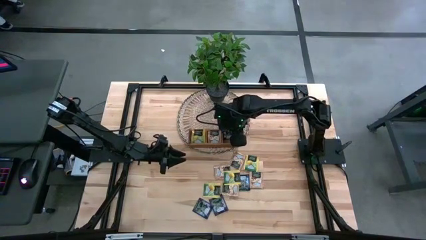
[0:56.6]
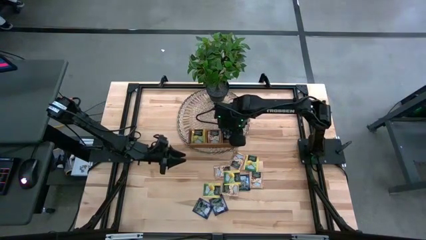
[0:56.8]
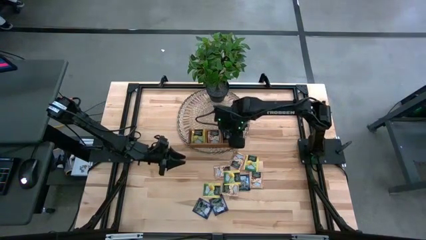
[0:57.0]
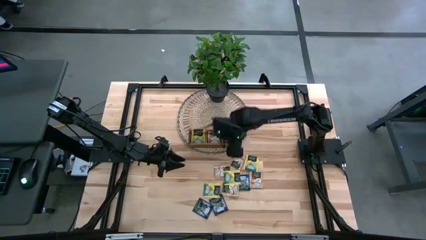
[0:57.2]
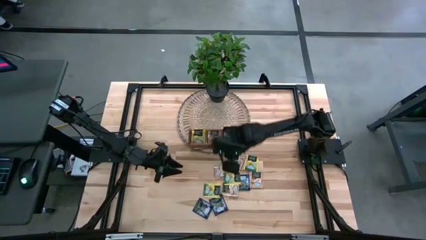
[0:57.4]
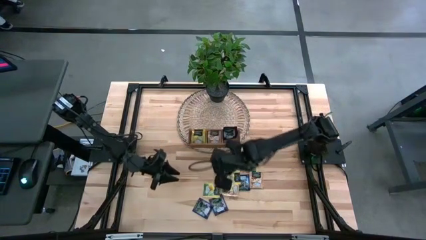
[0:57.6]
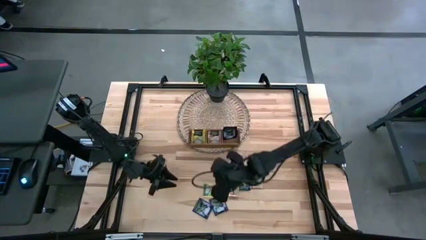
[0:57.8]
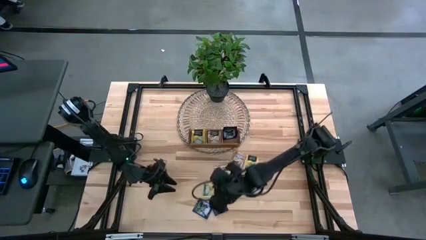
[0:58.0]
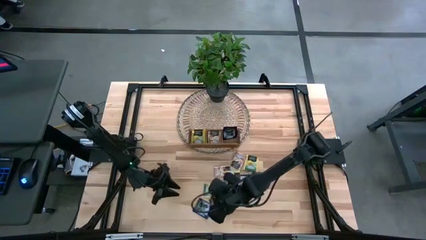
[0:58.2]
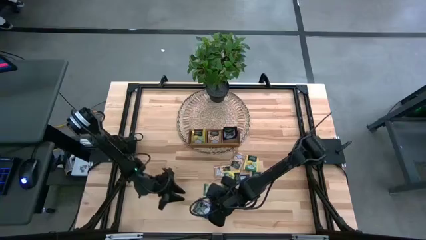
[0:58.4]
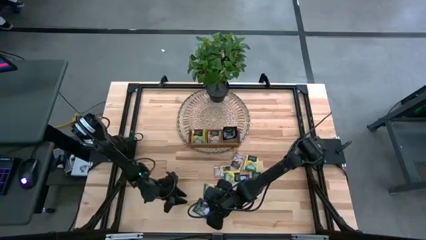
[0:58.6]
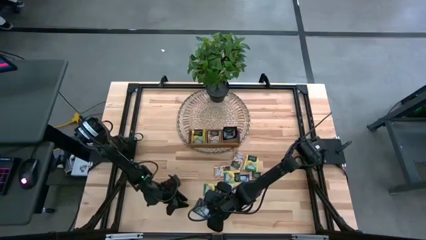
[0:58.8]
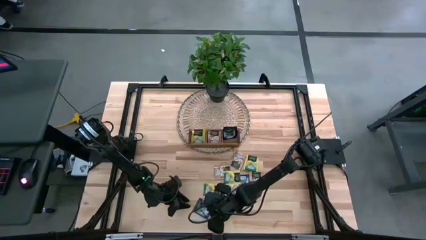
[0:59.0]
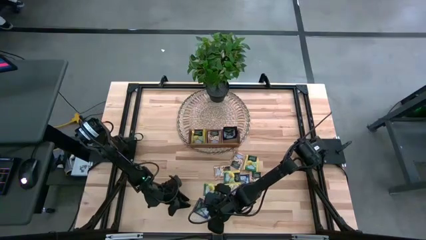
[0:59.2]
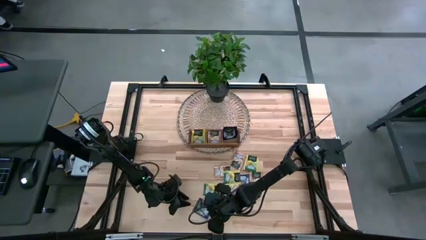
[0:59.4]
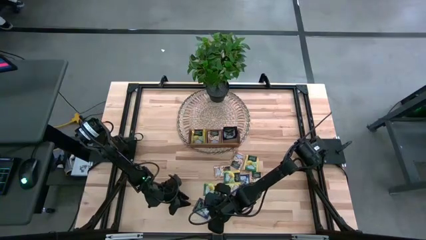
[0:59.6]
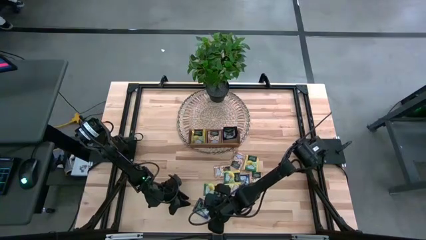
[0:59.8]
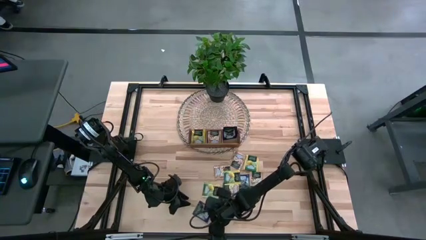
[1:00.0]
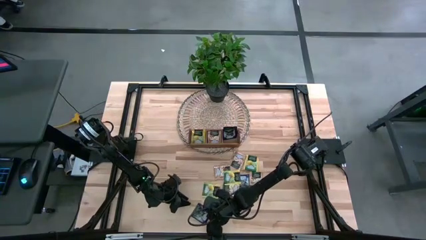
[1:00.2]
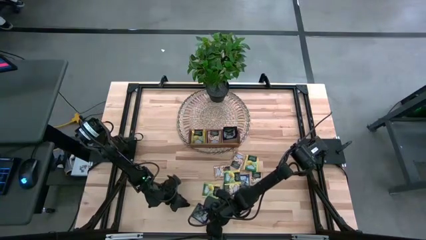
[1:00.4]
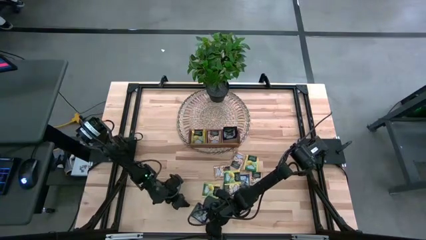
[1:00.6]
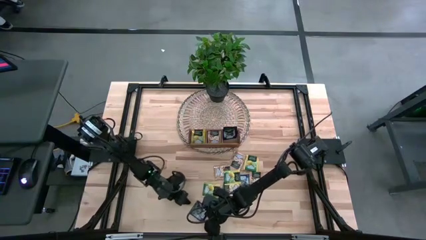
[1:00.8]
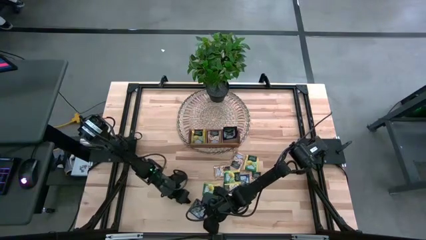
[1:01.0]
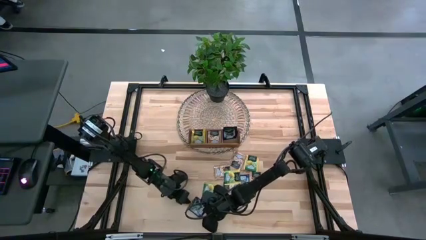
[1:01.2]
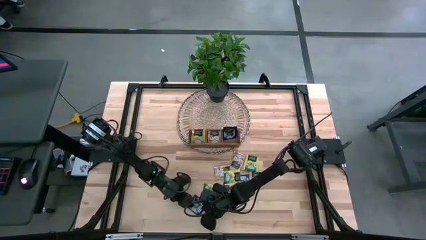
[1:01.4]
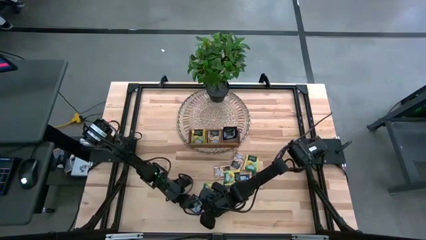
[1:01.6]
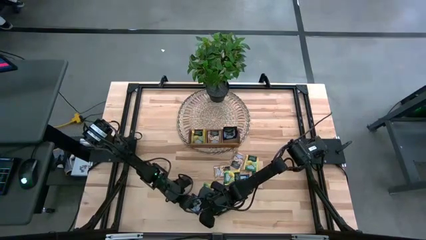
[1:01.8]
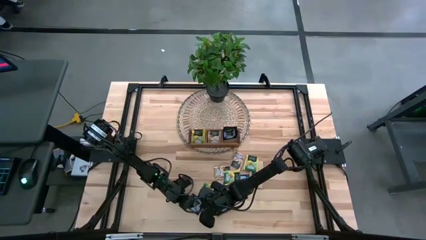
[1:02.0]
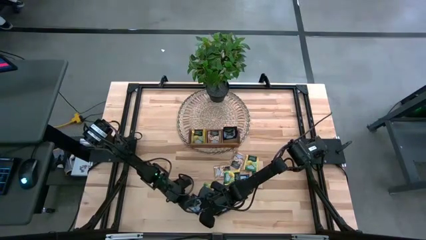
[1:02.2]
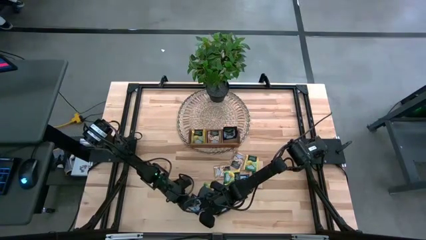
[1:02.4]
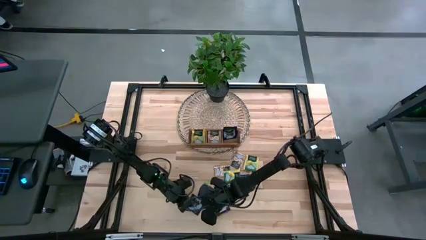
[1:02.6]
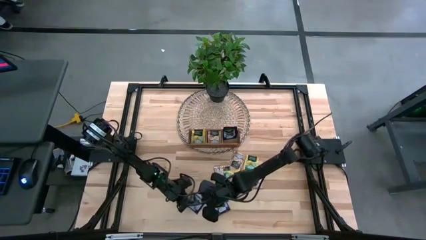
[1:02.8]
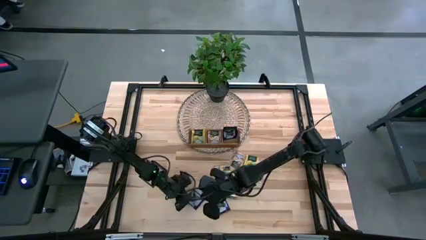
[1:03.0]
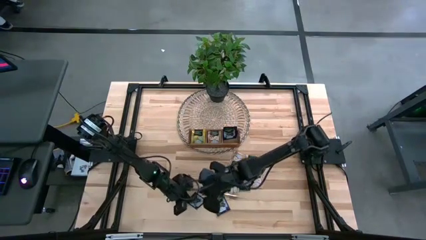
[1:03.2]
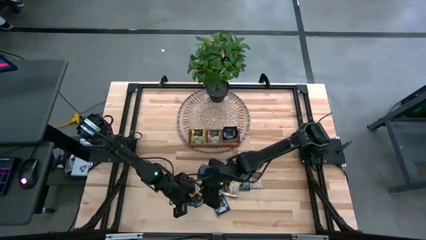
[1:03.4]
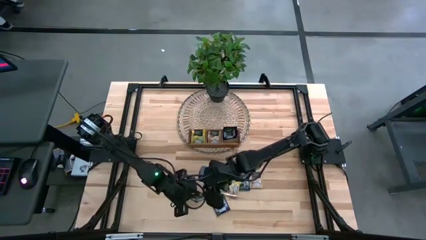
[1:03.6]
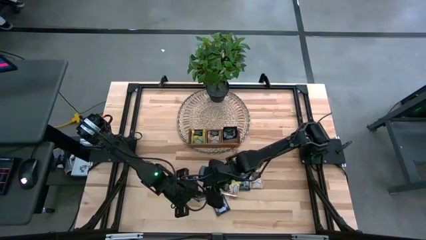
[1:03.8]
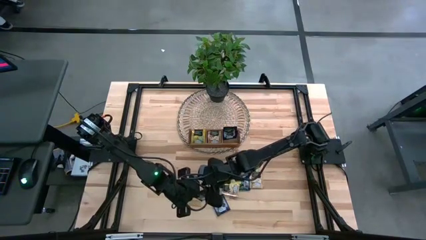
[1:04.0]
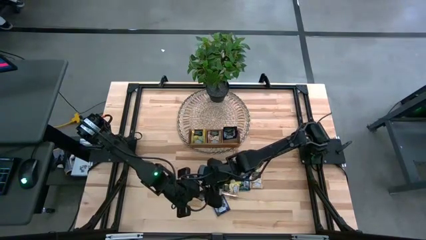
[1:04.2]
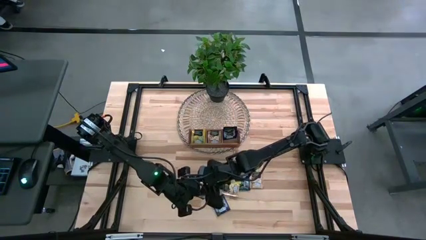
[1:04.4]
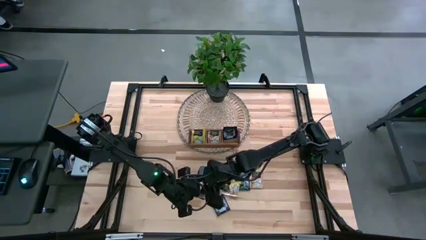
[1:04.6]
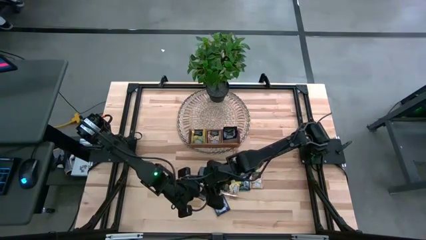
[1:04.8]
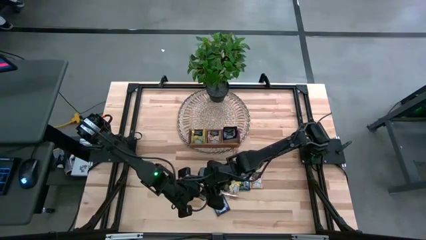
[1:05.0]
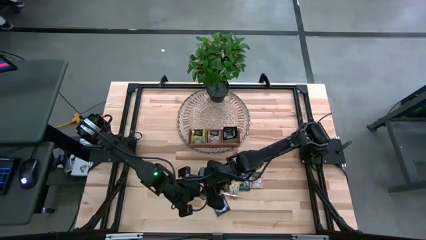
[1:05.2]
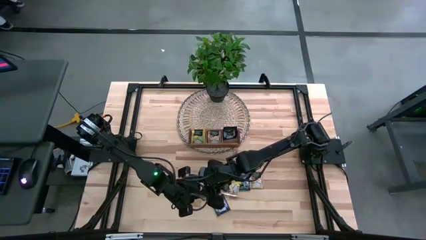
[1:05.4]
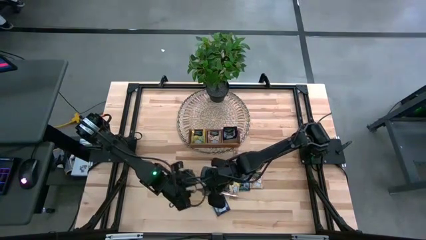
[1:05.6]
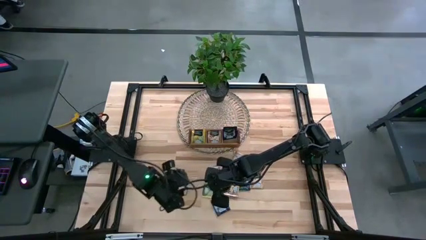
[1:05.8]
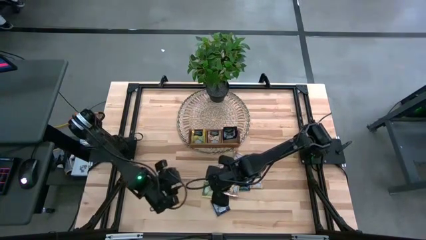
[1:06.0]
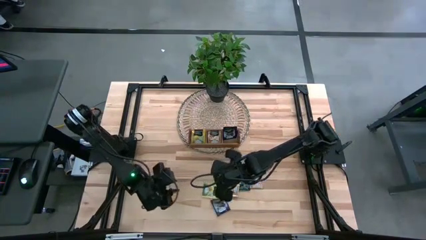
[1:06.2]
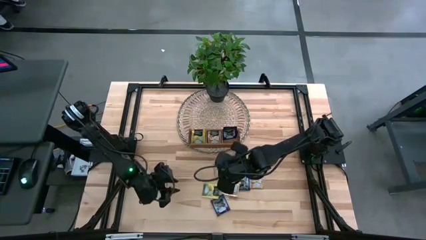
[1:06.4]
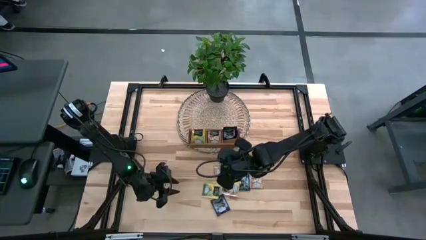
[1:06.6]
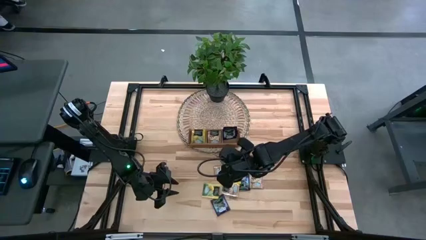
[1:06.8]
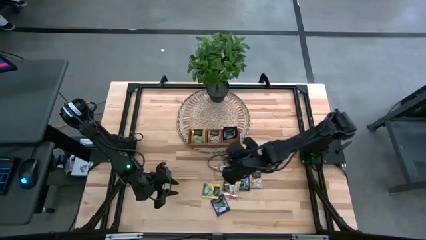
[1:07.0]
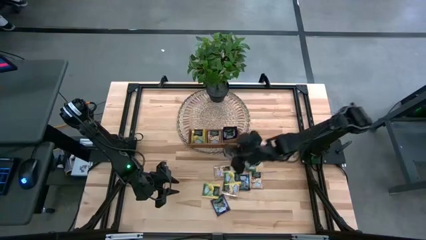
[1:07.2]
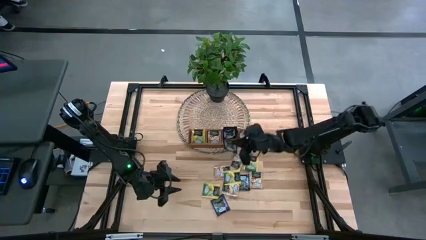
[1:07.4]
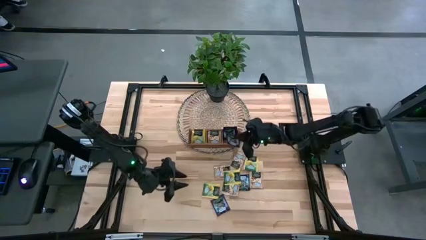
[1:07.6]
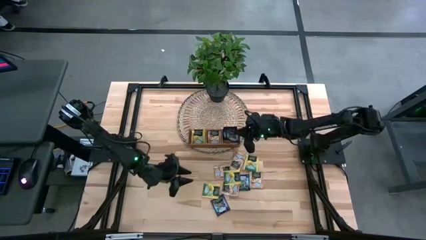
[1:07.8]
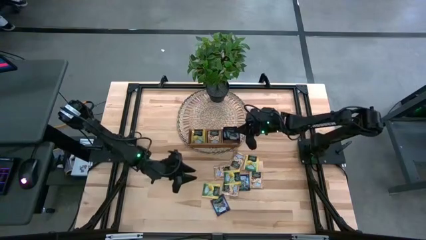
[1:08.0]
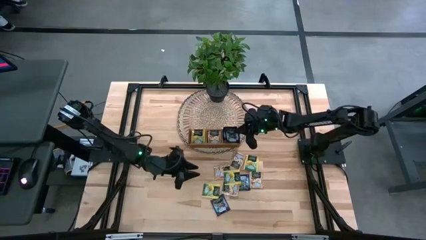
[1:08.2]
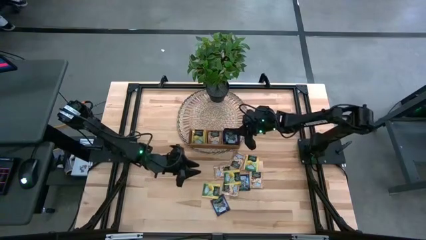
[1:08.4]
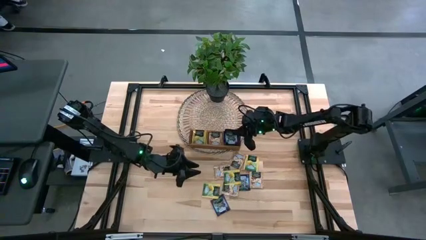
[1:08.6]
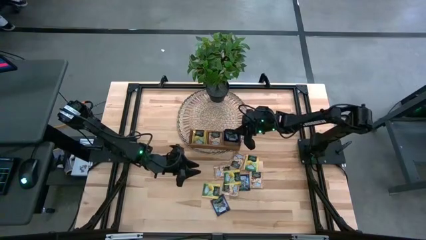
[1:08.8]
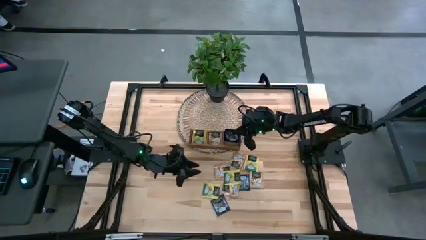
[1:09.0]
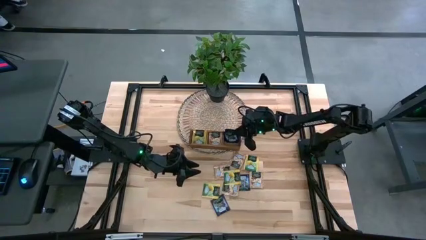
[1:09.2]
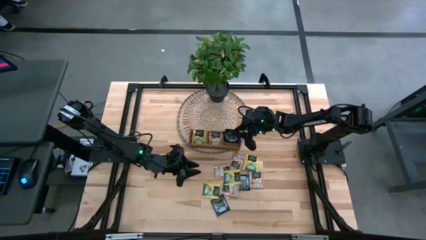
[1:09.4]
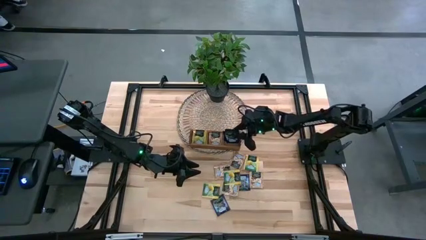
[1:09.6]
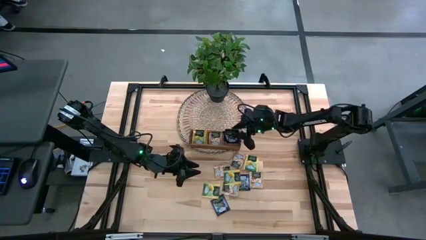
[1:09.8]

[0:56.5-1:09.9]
Task: Pick & Place Tea
Put the violet tea bag into the right section of the wooden organizer

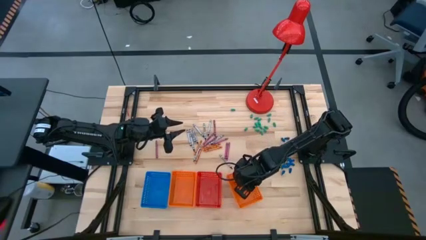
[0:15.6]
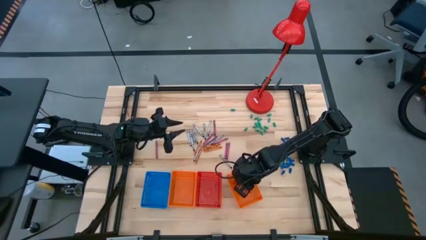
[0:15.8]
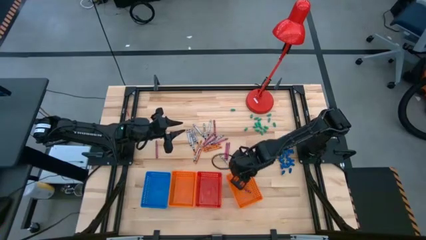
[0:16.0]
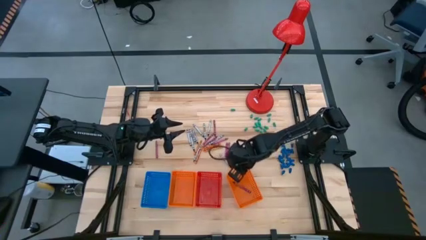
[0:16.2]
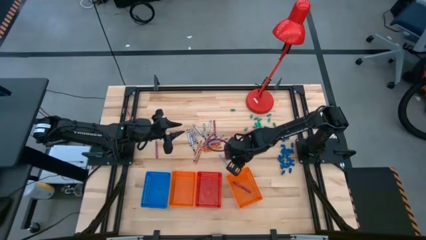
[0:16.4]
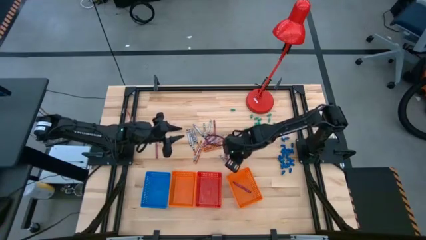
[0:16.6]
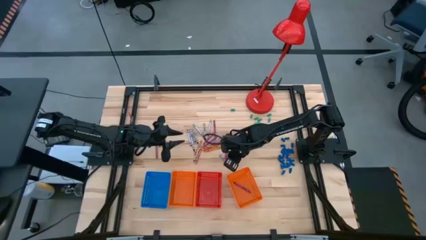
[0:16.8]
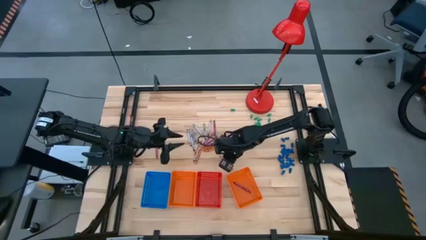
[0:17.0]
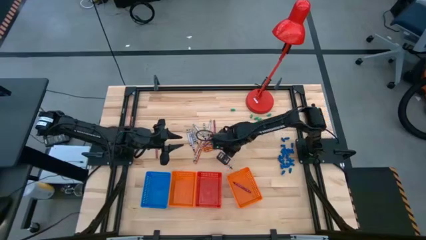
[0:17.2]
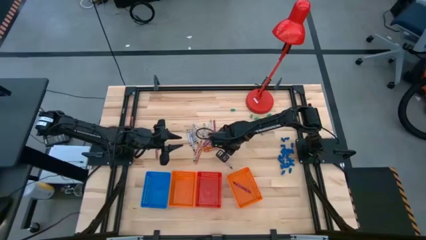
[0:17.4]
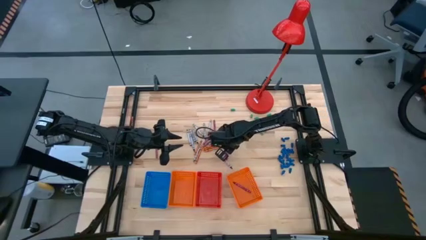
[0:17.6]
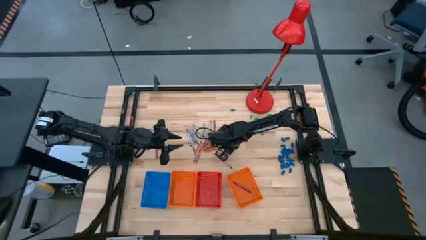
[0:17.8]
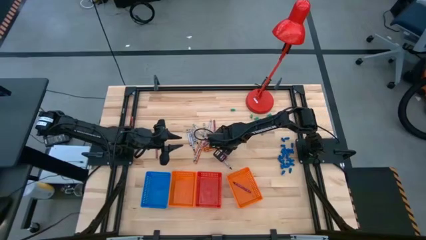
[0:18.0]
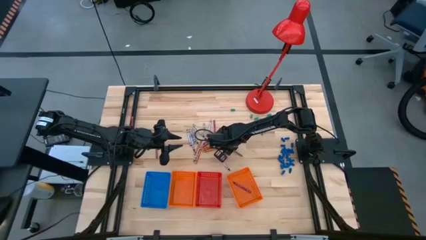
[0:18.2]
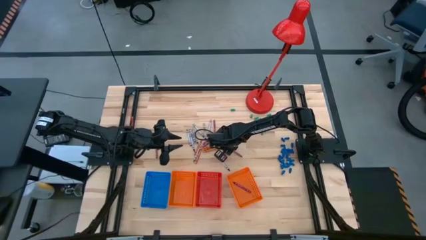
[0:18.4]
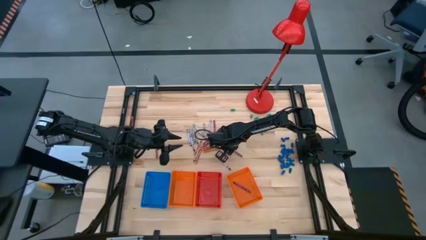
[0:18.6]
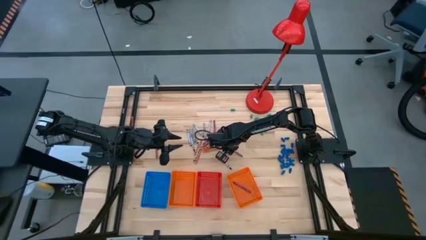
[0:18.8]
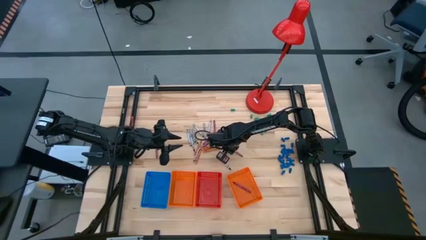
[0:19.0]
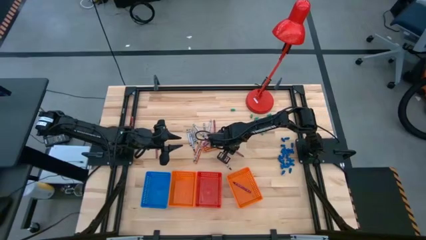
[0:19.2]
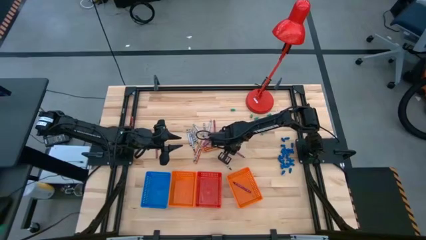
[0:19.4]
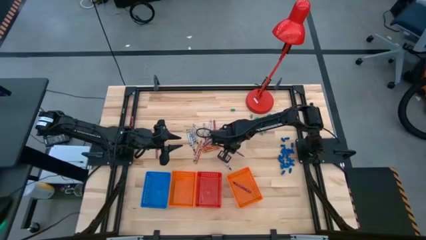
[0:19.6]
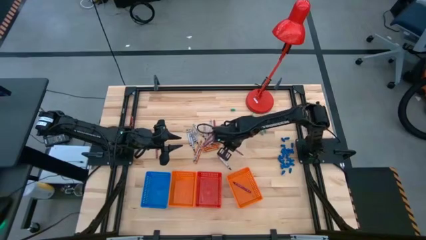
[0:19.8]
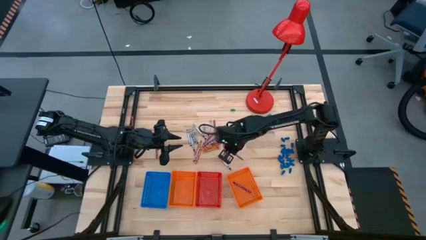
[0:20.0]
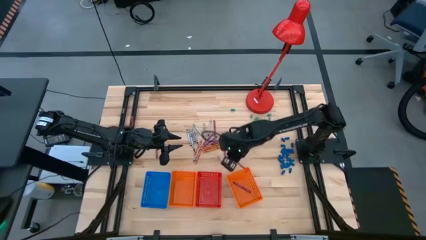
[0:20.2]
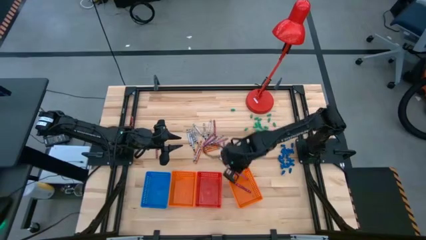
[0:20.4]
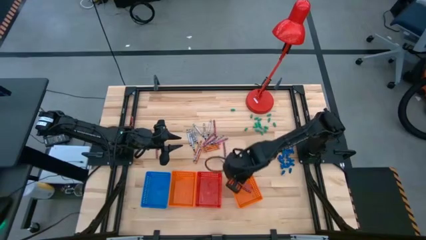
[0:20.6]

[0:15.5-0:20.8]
Task: Sort crayons
Put the red crayon into the right orange bin
